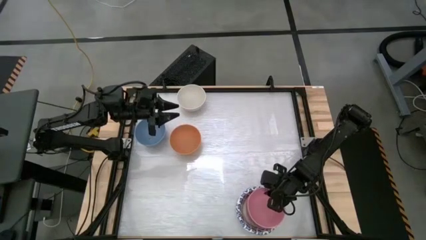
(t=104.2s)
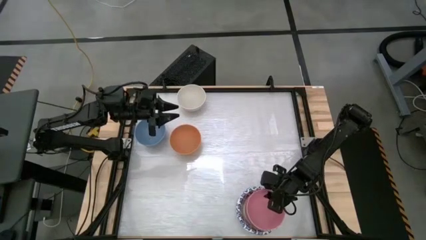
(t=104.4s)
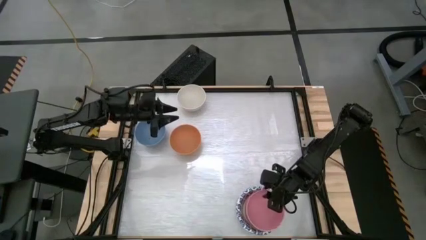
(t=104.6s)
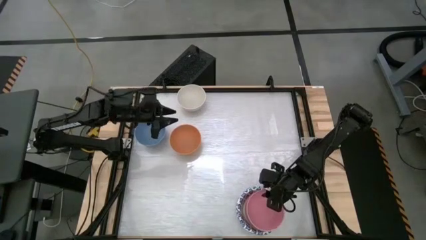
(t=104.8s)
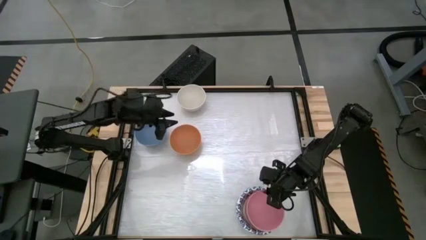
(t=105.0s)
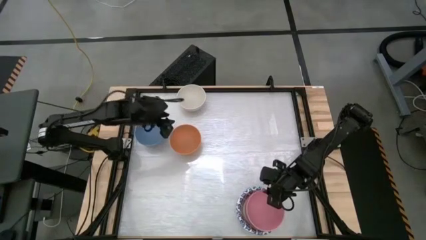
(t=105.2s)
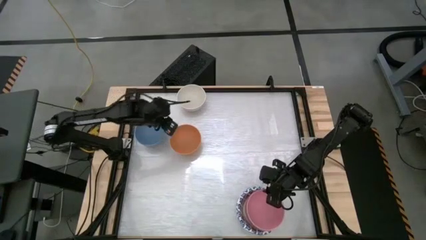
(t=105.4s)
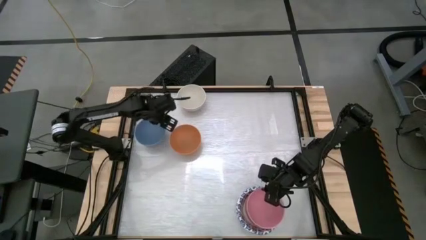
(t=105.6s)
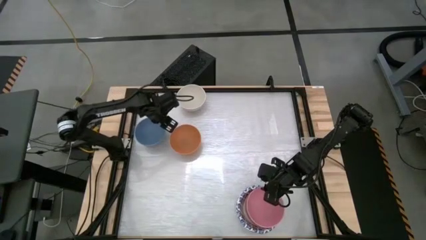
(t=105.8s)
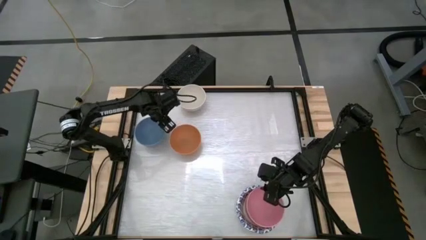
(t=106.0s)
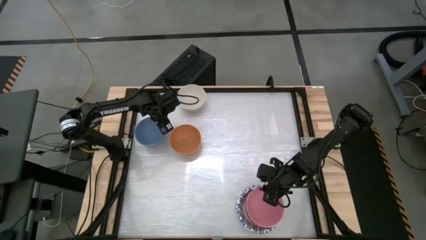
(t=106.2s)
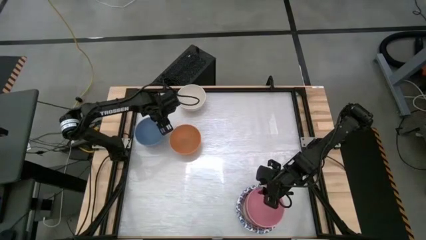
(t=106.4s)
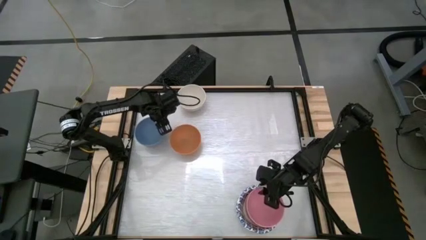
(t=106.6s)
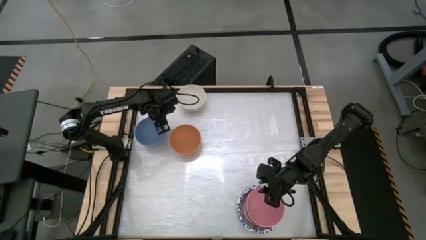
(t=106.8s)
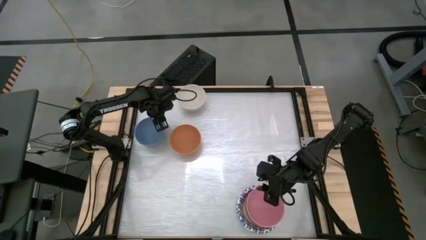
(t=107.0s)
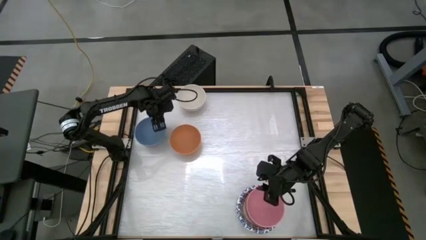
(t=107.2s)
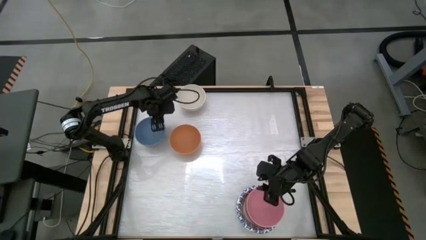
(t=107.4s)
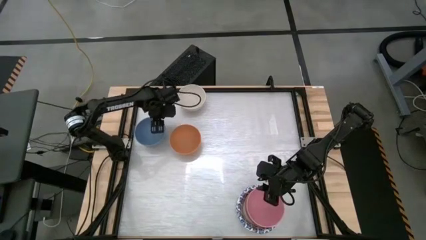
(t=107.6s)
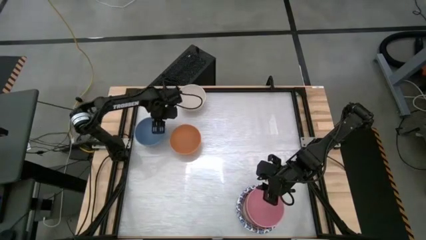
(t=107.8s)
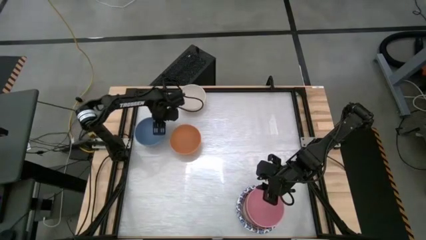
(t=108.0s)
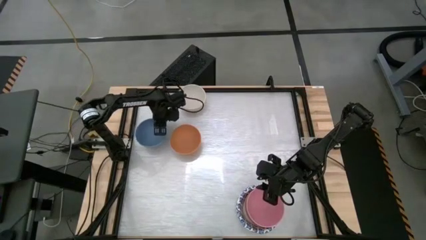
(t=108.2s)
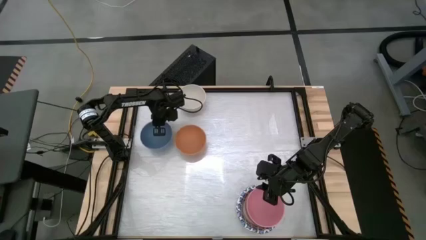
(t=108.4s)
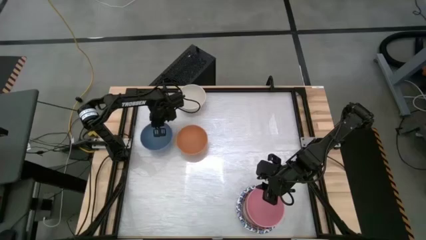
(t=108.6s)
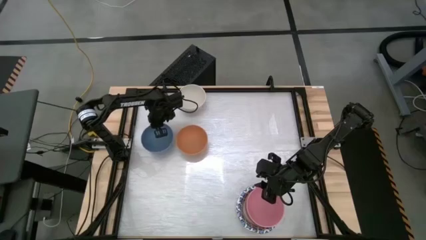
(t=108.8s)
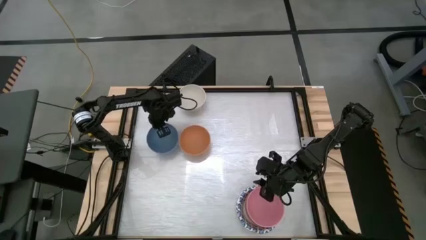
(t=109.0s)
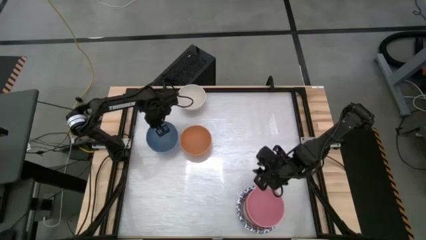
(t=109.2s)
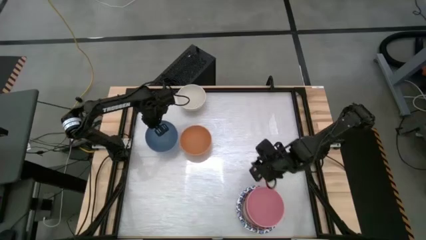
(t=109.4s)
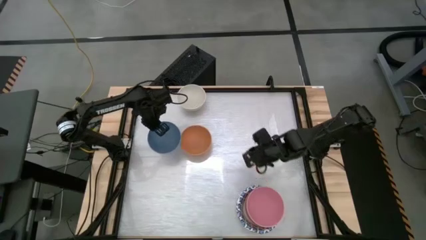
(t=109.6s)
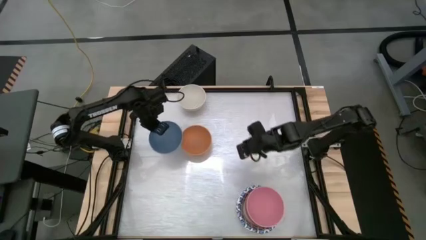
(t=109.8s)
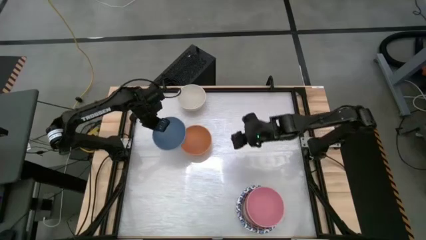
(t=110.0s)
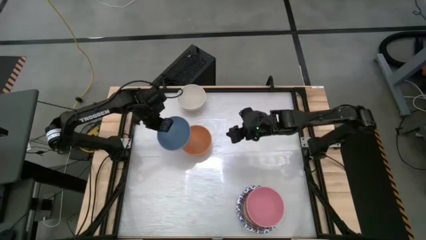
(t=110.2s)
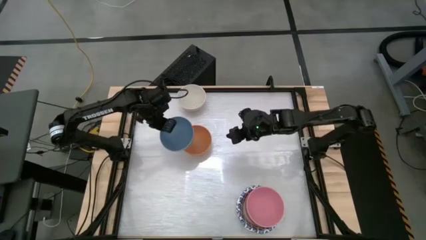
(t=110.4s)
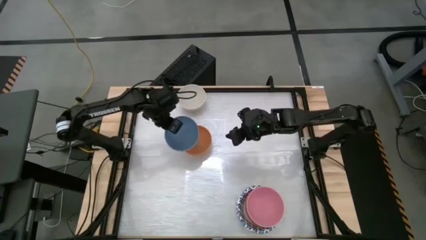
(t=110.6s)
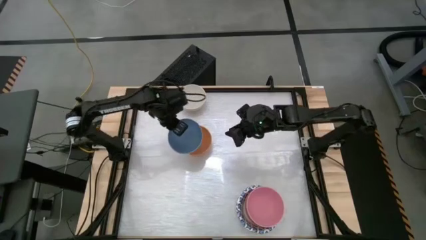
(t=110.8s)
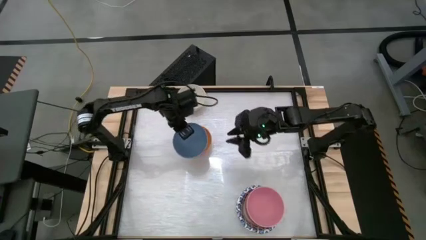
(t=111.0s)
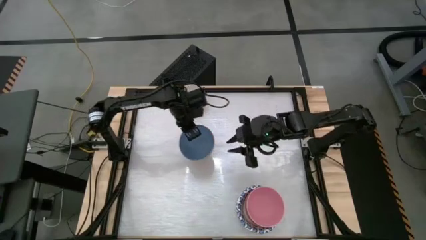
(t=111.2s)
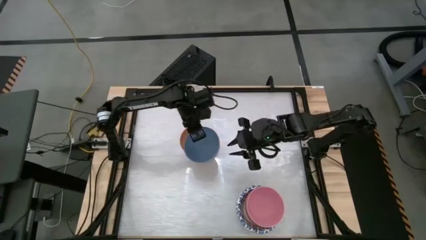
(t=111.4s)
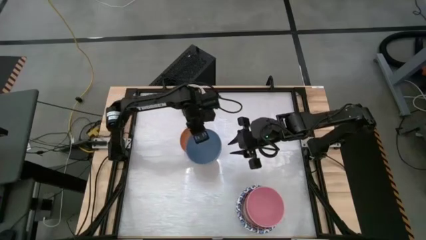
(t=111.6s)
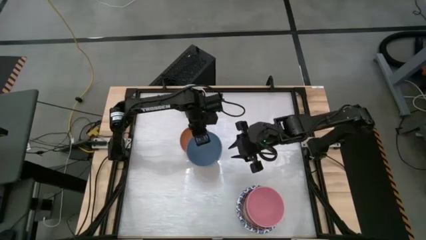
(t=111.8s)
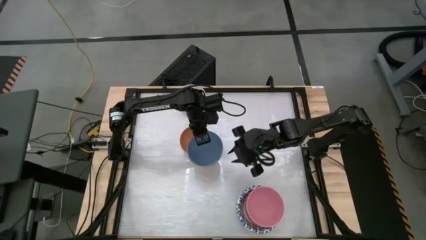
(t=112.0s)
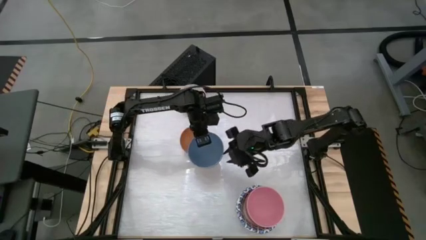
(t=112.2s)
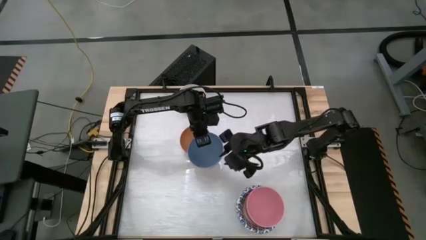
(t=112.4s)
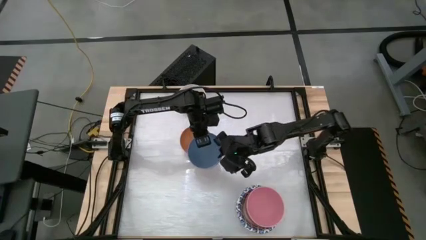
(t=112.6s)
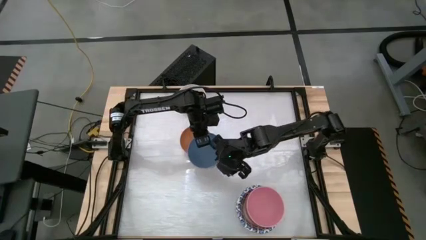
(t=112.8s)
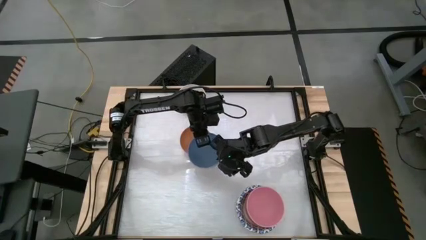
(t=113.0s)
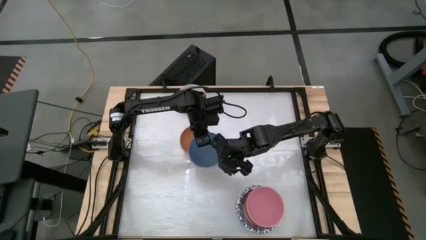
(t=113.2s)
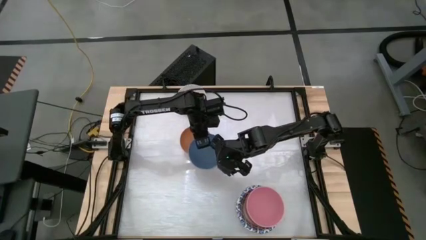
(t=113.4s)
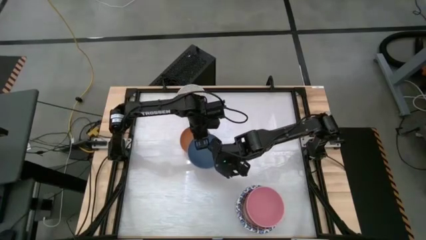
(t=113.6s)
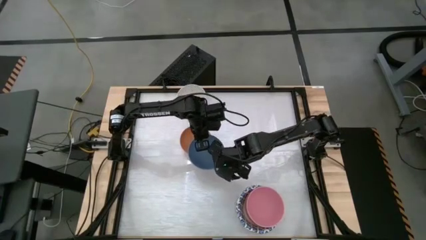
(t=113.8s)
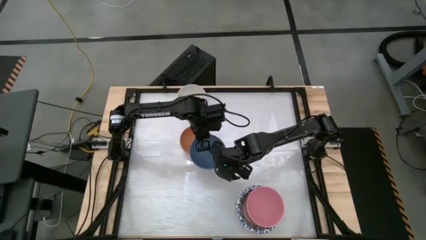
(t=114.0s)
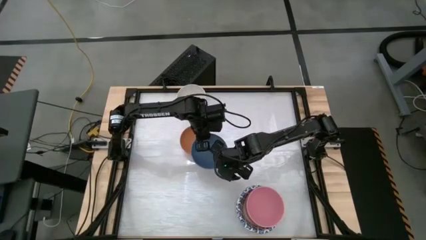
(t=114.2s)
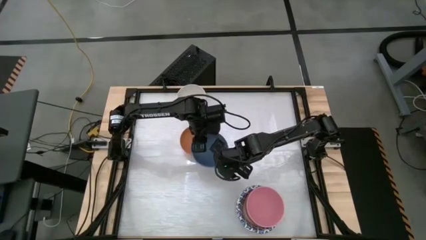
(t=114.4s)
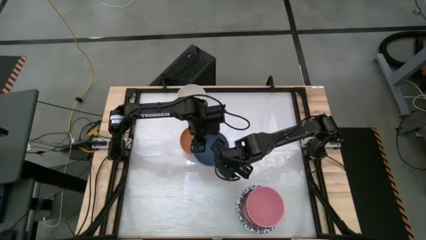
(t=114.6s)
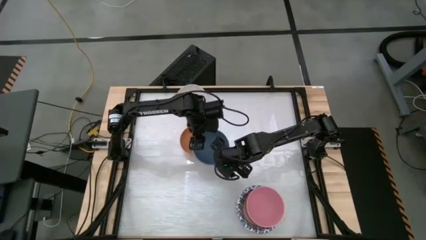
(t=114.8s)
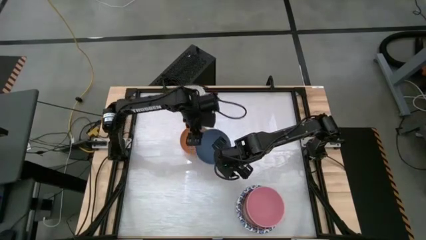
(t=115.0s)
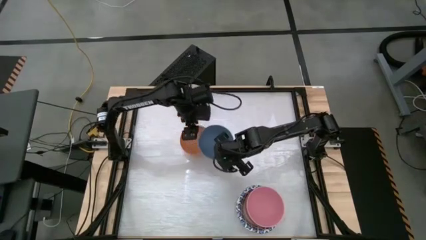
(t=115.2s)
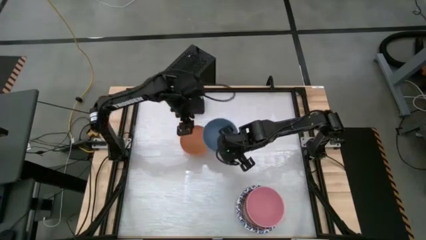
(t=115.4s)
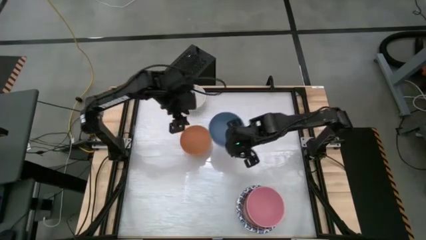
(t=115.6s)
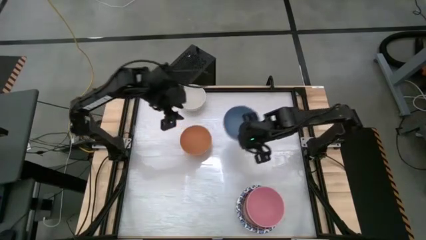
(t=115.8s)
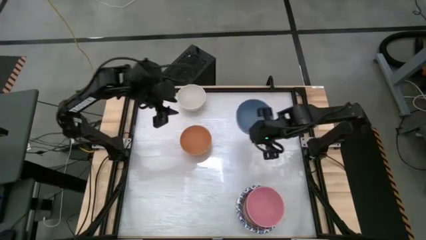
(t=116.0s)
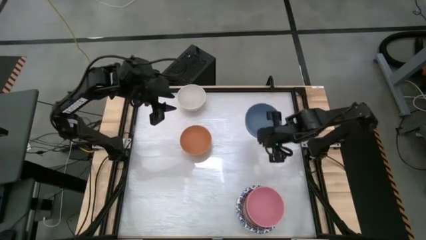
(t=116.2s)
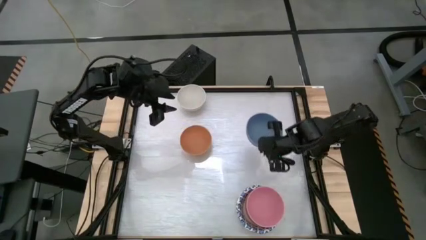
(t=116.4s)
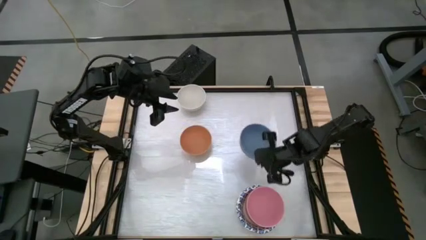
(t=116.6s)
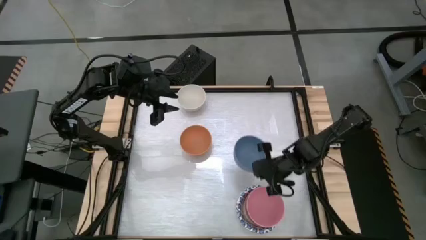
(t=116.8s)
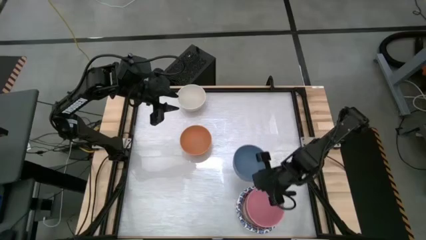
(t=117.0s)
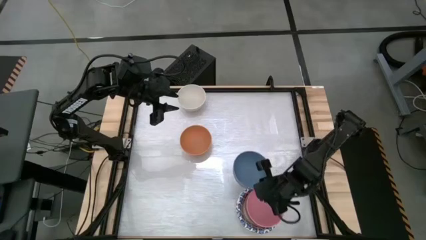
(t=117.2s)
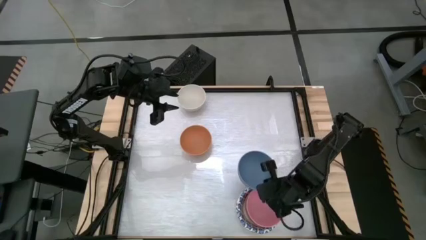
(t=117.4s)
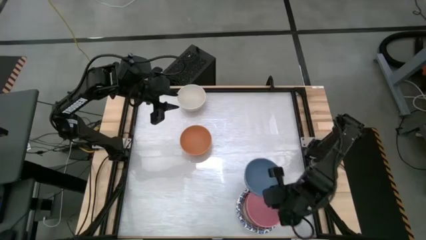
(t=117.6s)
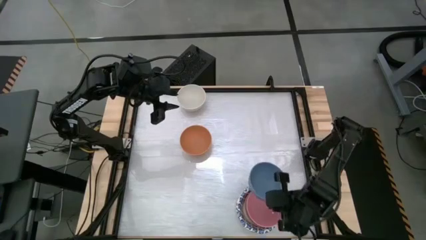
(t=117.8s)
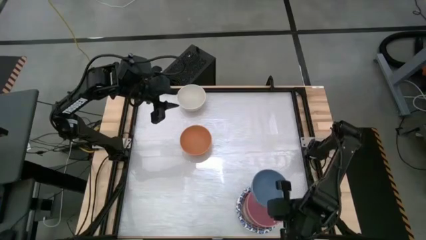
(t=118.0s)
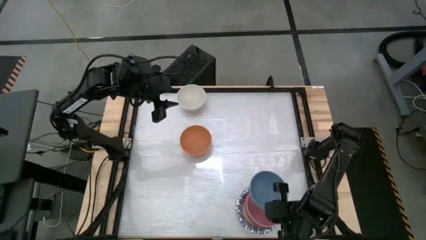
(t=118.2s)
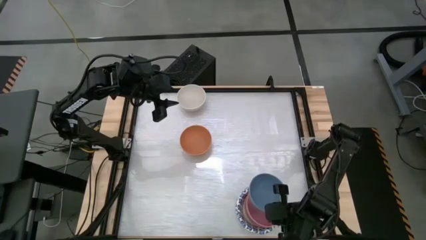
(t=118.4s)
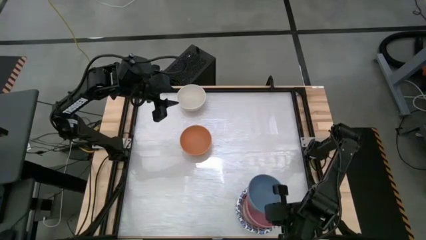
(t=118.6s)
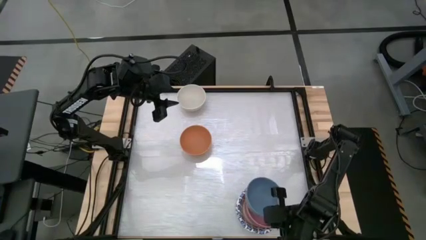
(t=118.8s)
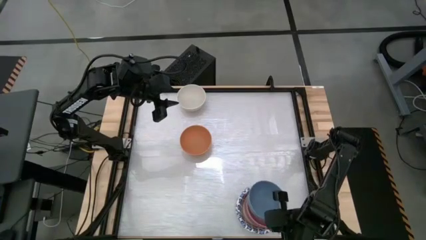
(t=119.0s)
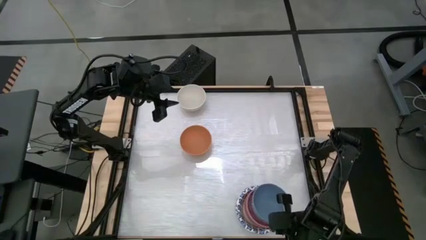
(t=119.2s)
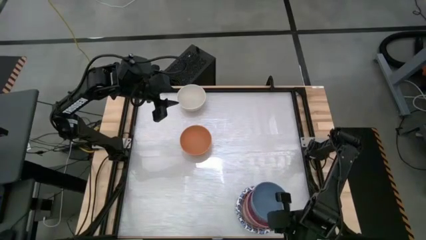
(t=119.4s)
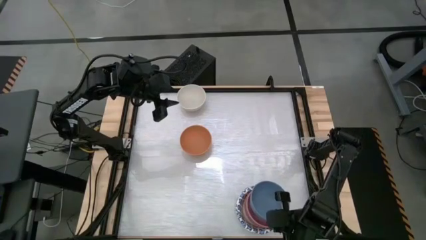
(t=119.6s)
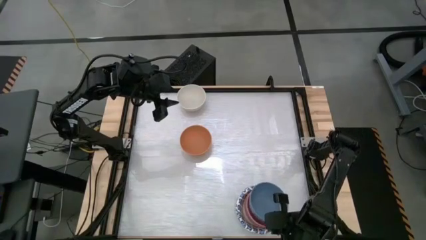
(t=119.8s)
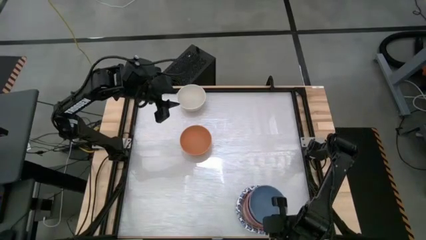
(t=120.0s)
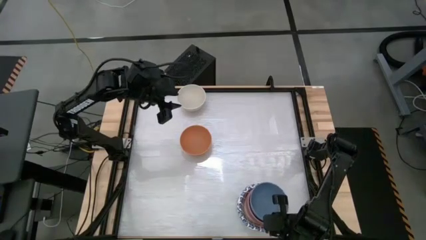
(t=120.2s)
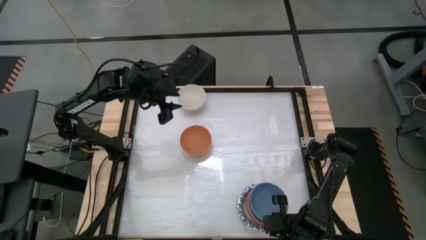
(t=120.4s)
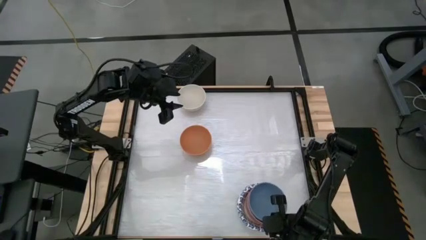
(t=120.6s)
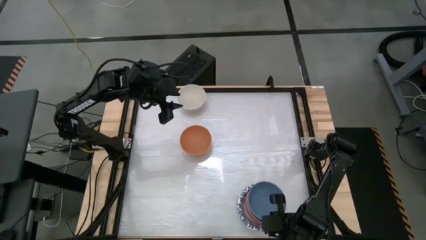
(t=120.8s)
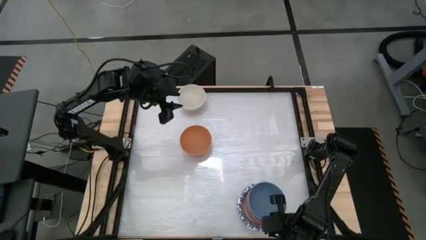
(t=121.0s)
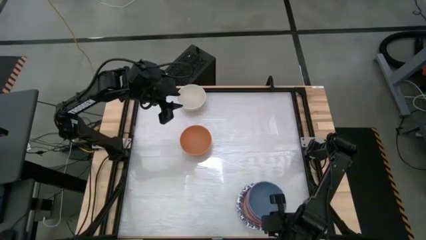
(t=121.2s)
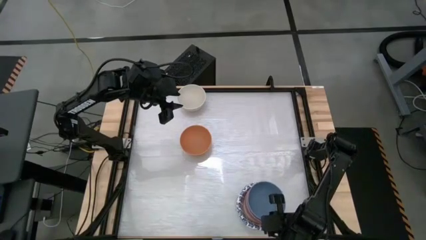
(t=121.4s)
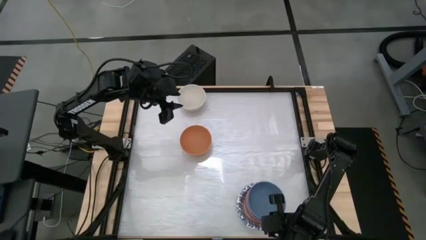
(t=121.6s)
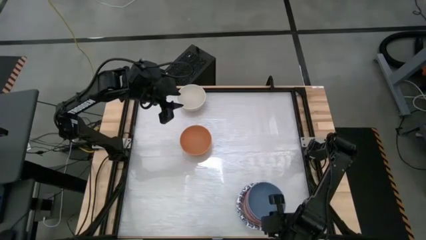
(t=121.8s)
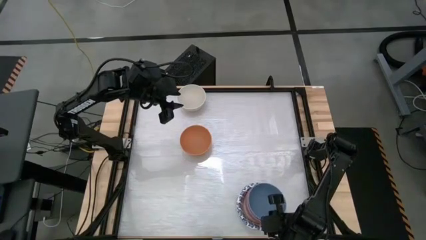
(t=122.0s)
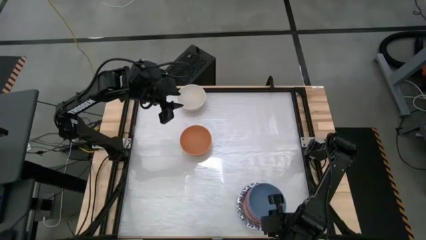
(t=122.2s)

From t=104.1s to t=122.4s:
Stack the blue bowl on top of the other pink bowl
